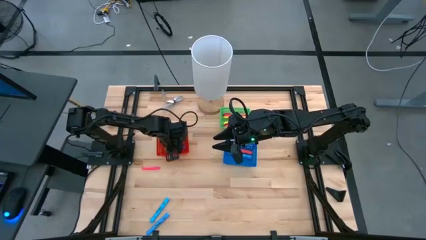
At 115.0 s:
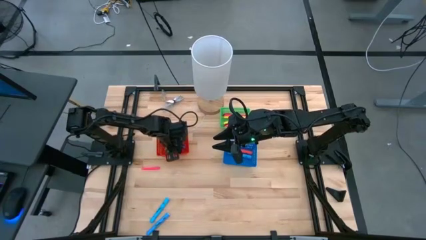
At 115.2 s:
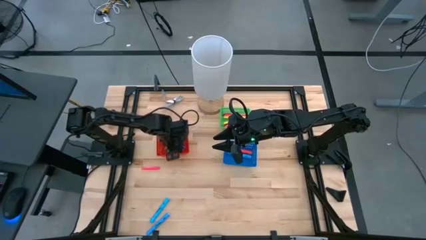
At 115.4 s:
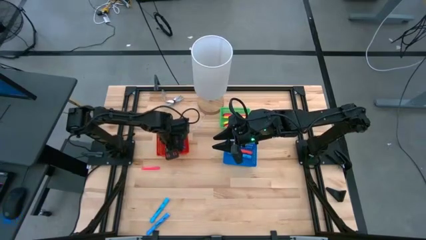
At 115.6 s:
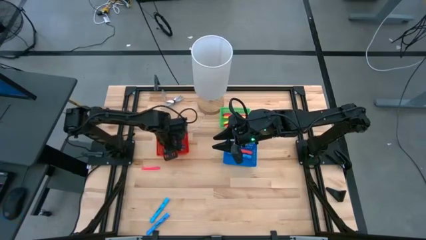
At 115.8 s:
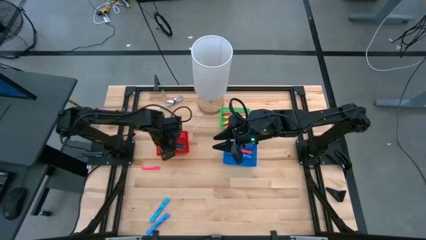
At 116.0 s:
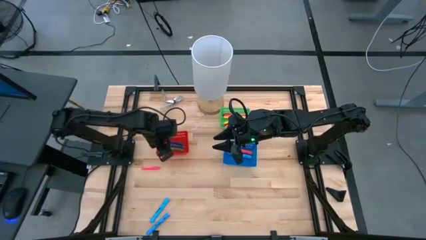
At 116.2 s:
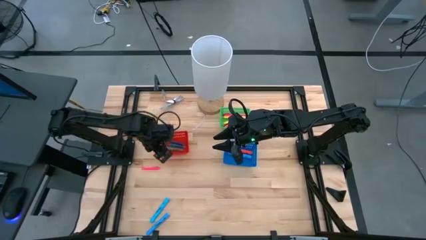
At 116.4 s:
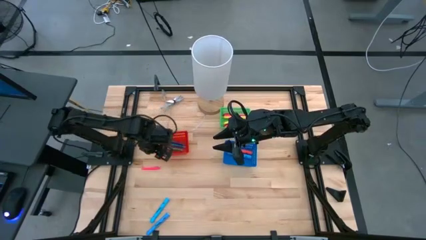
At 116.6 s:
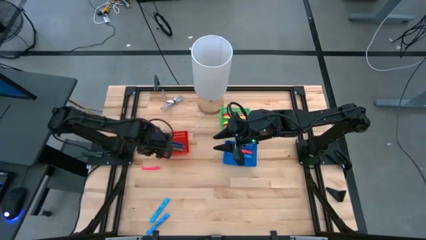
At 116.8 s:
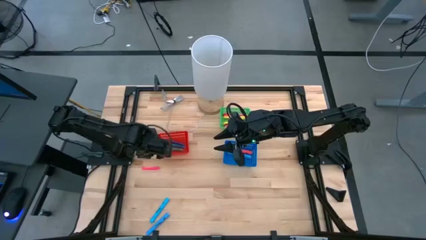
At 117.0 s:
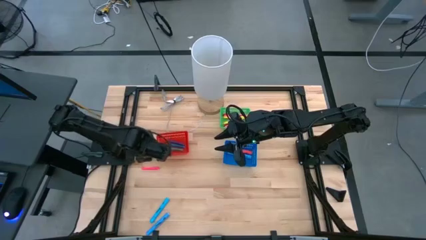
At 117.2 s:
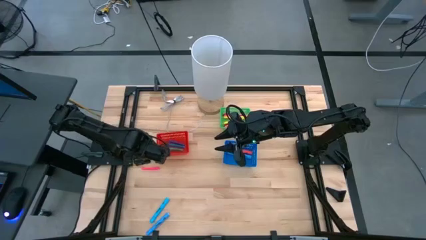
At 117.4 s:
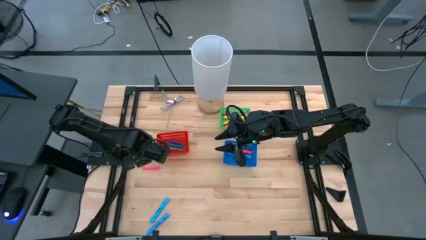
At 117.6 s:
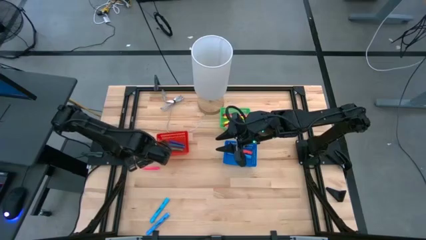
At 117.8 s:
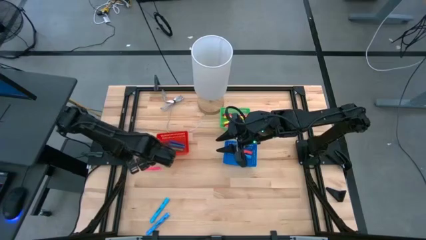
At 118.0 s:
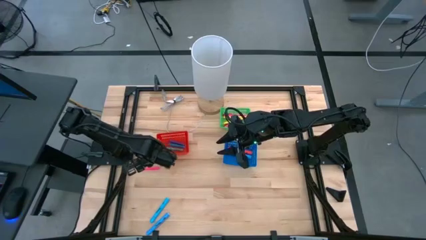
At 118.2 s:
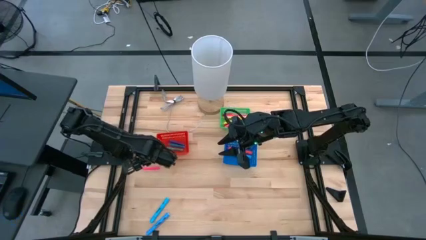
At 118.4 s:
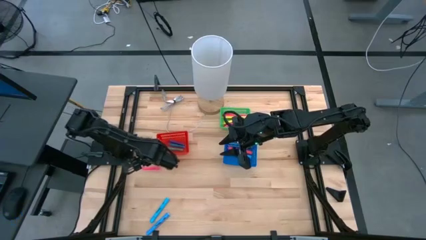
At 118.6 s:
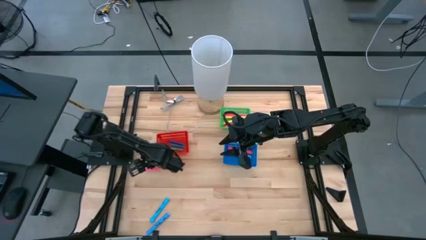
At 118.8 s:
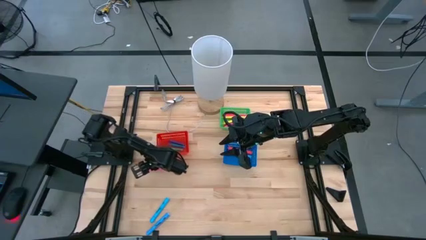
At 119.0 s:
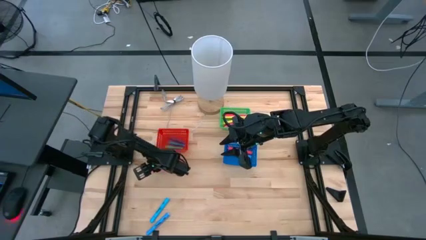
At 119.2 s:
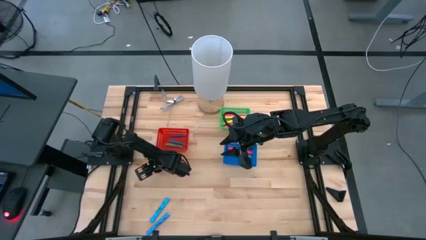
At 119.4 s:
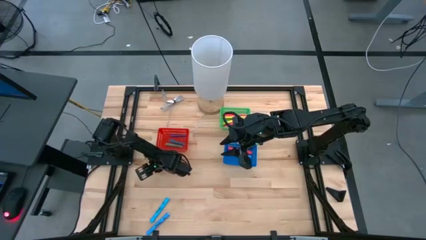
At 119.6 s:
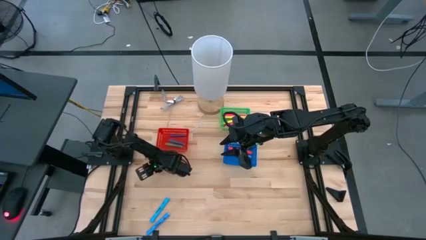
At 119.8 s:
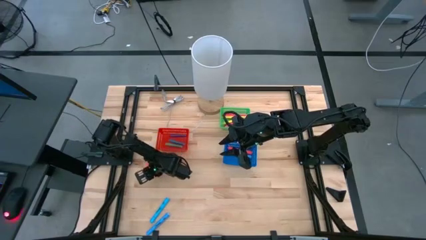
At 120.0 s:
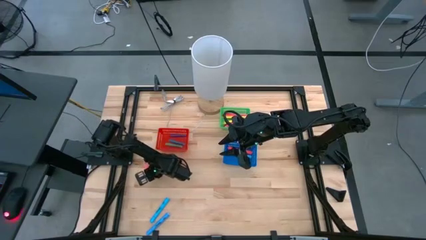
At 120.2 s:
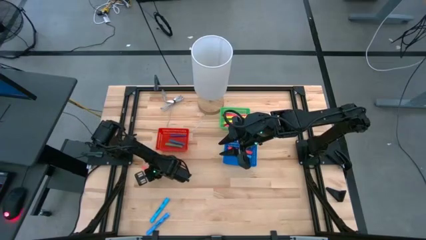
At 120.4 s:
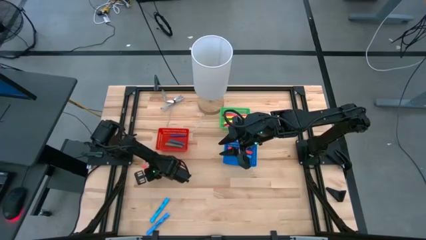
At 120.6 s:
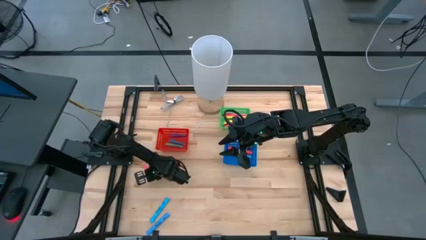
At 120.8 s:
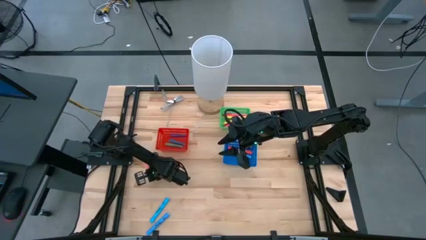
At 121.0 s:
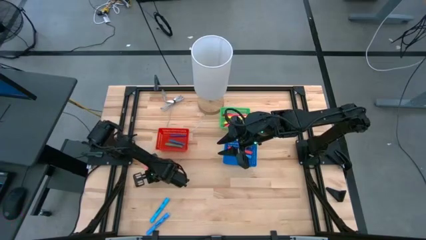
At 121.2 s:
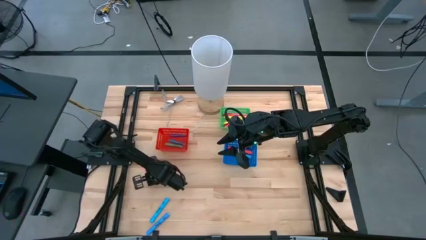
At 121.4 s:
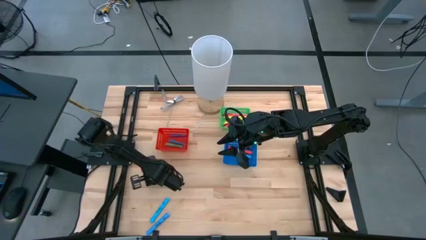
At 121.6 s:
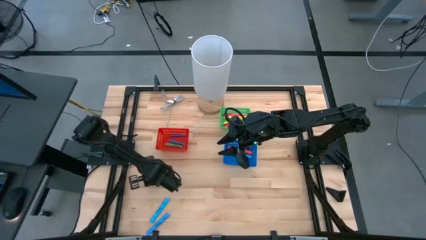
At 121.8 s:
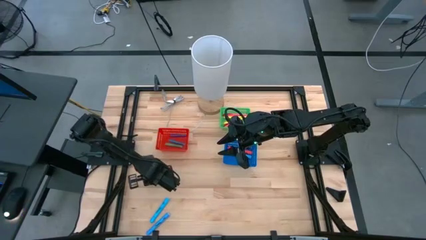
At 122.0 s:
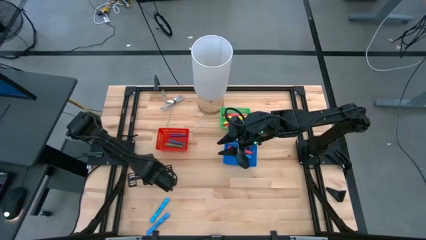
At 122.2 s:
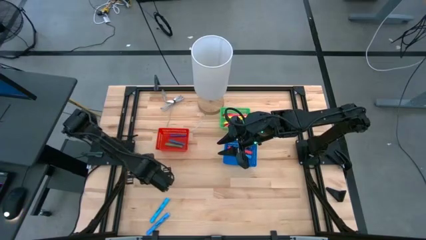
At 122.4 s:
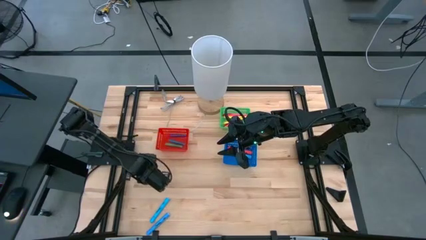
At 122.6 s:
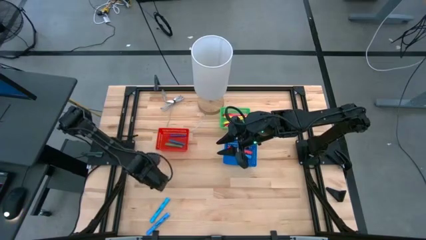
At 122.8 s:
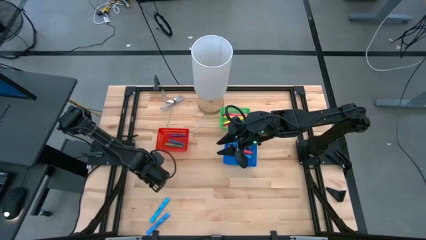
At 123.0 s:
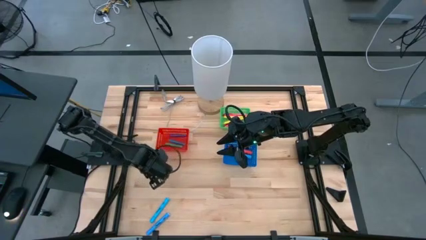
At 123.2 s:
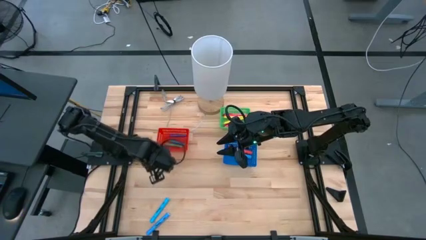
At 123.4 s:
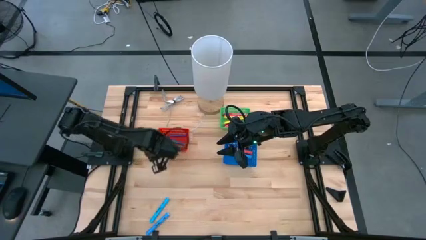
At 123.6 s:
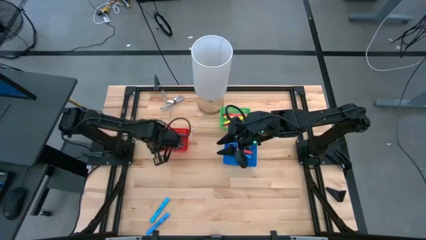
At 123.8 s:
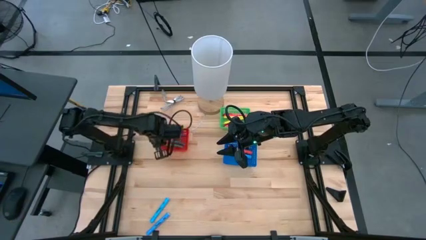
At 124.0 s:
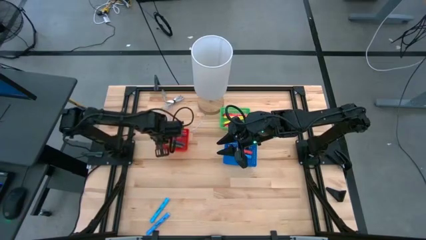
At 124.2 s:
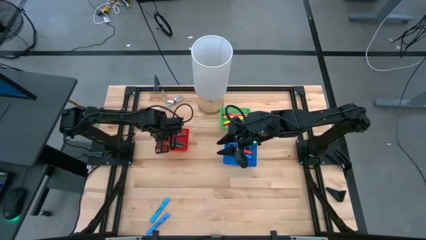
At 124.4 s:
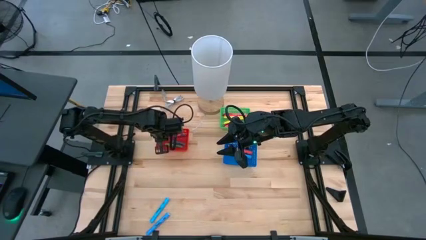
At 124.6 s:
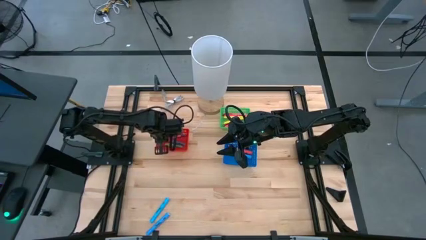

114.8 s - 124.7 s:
Task: Pick & Place Markers
Put the small pink pen into the red bin
